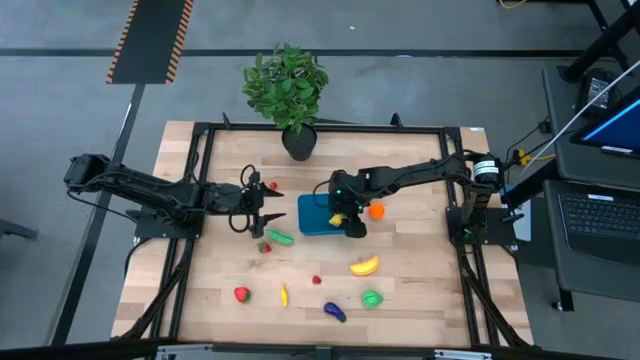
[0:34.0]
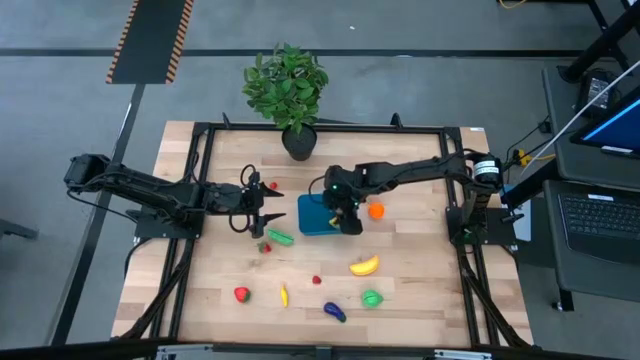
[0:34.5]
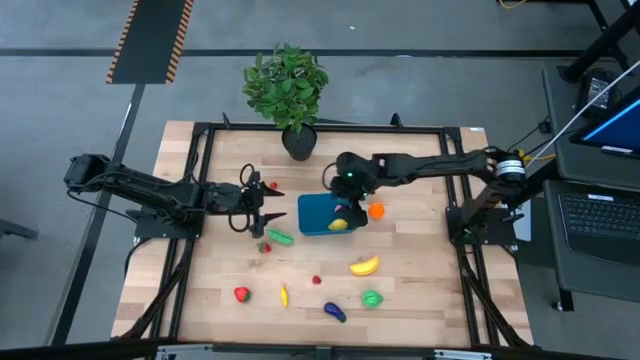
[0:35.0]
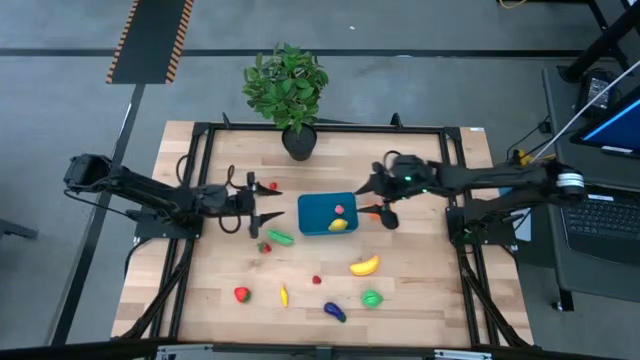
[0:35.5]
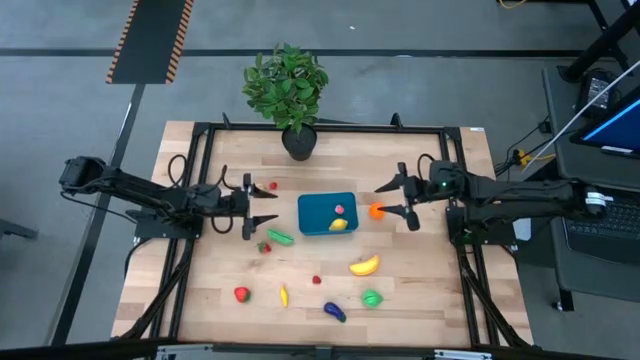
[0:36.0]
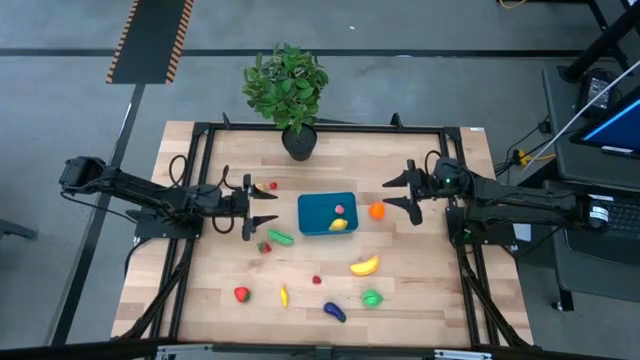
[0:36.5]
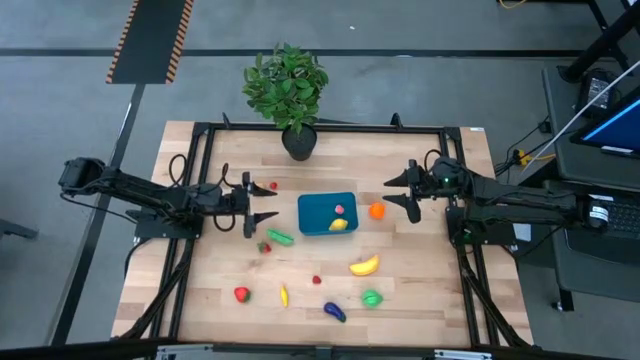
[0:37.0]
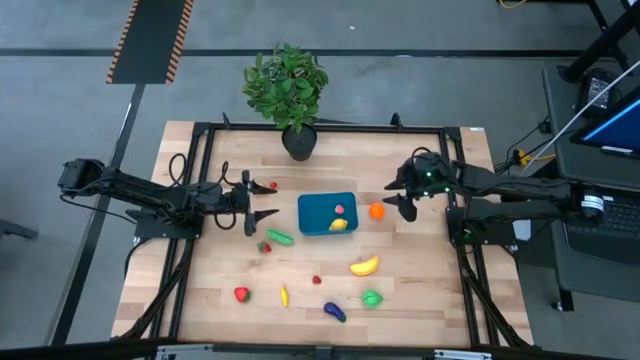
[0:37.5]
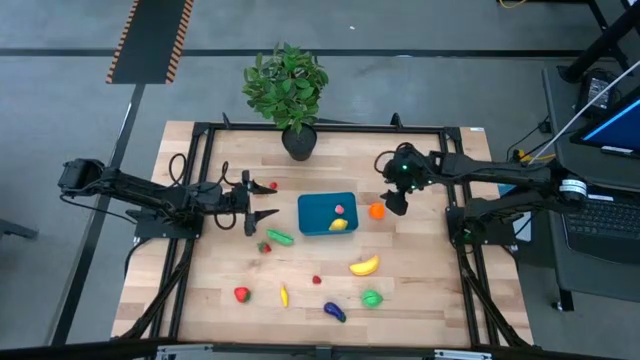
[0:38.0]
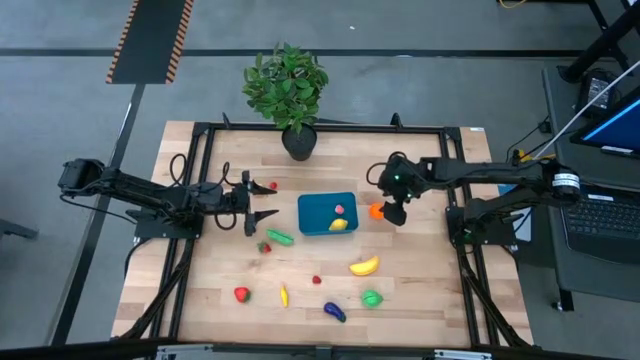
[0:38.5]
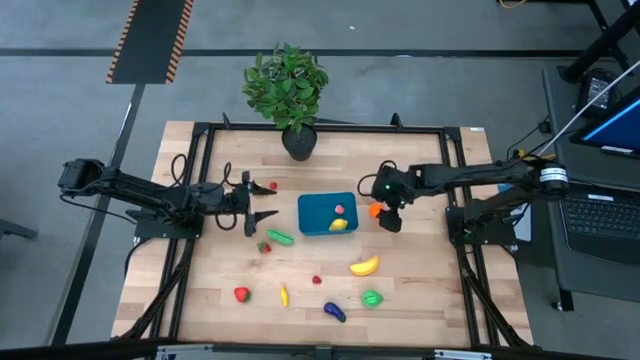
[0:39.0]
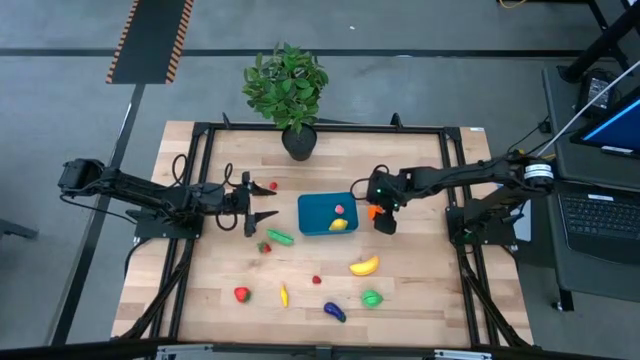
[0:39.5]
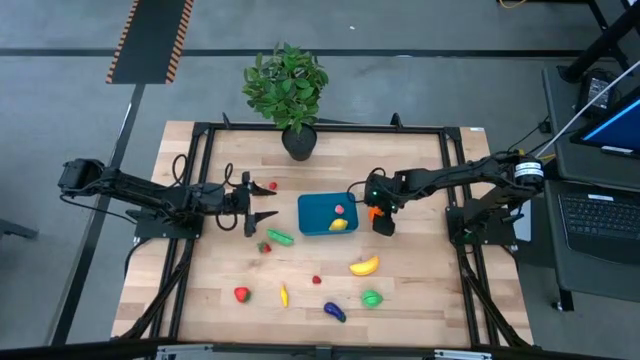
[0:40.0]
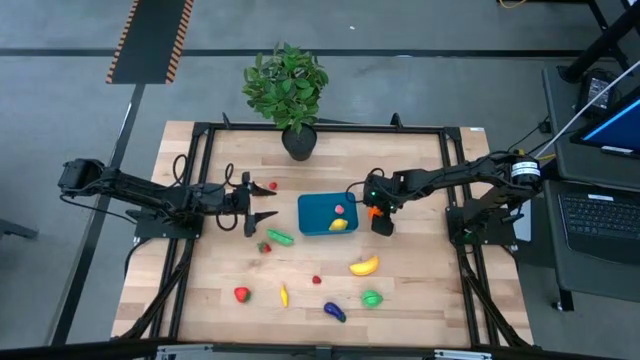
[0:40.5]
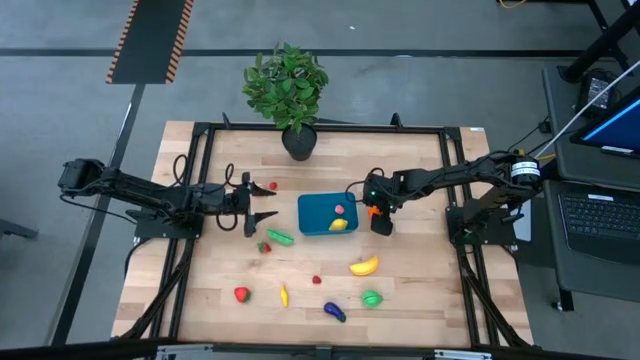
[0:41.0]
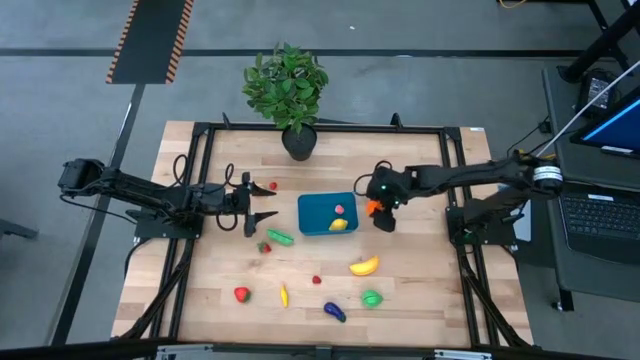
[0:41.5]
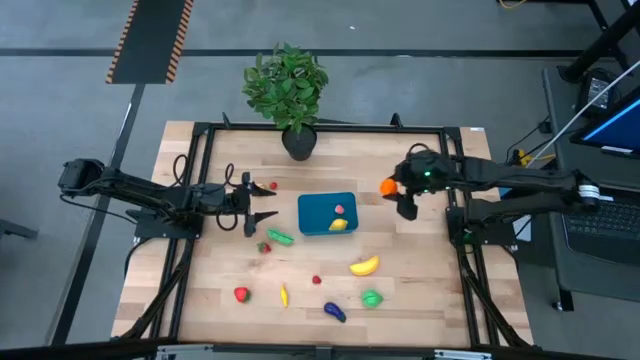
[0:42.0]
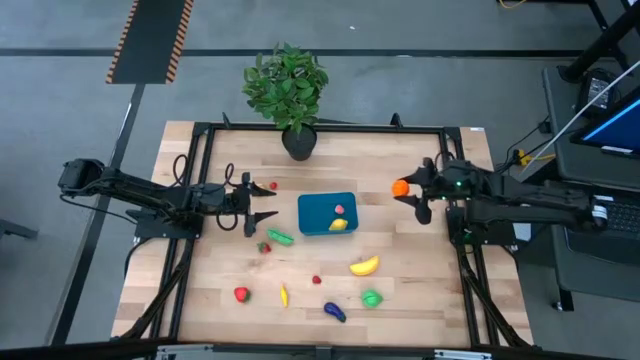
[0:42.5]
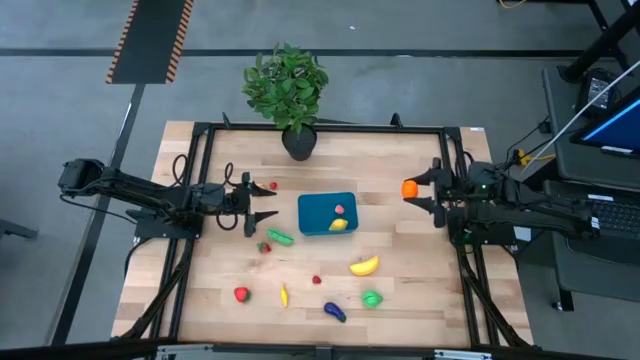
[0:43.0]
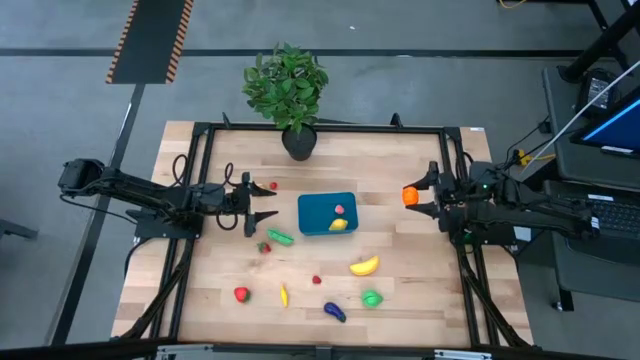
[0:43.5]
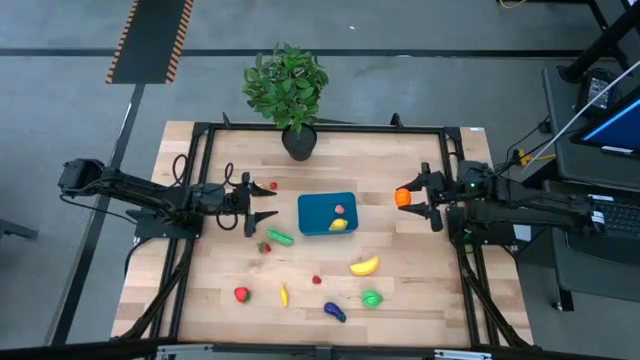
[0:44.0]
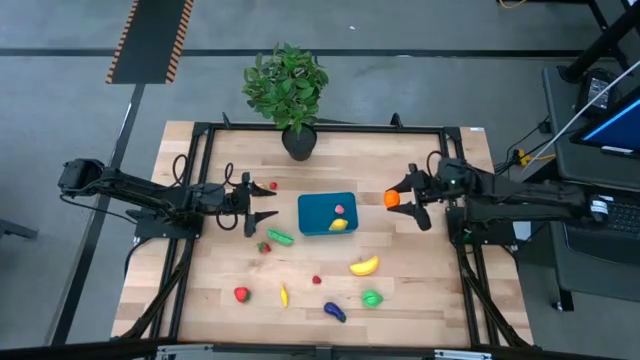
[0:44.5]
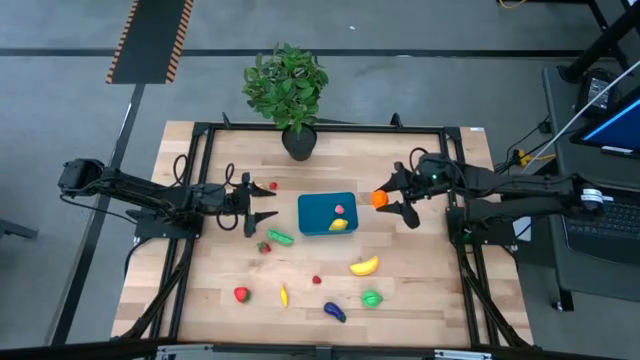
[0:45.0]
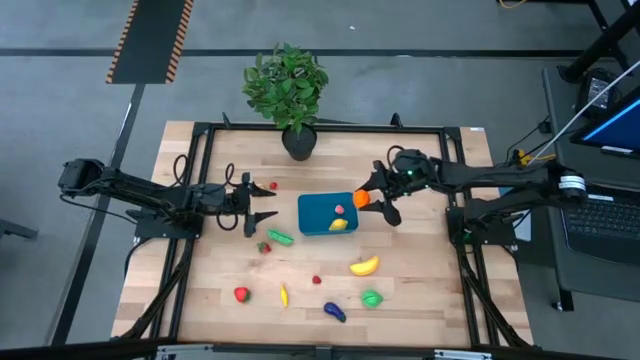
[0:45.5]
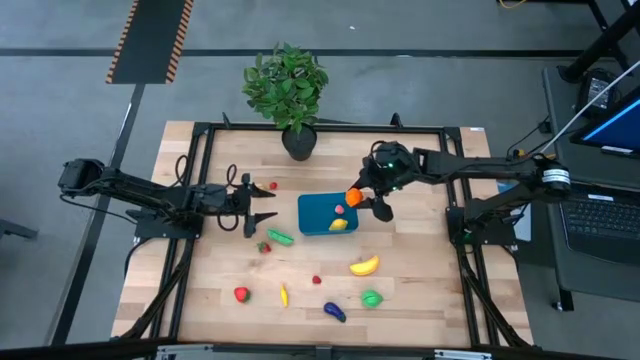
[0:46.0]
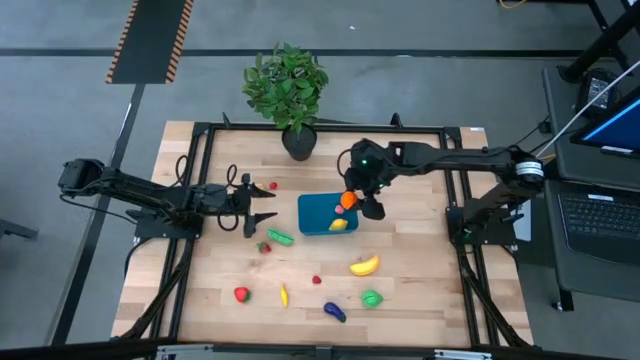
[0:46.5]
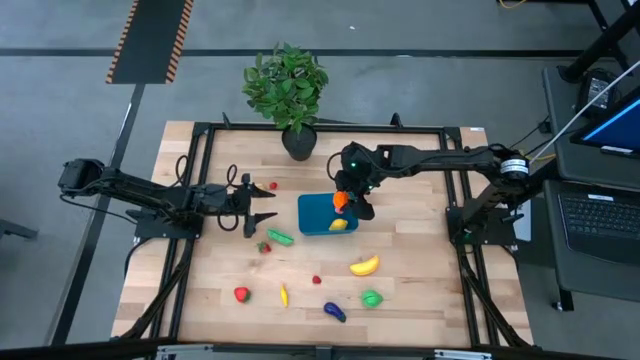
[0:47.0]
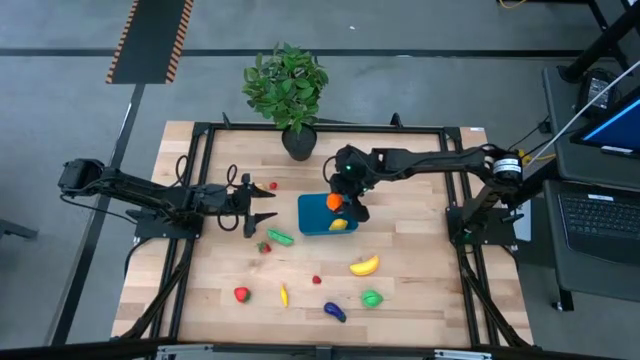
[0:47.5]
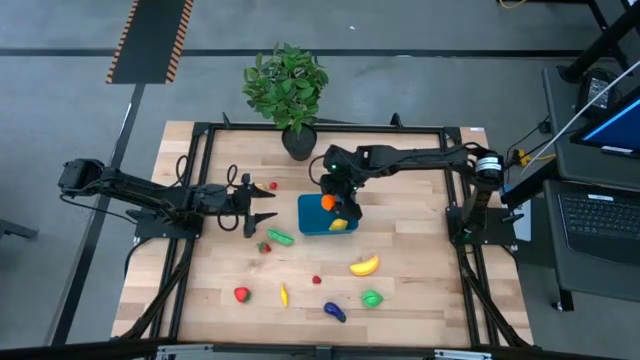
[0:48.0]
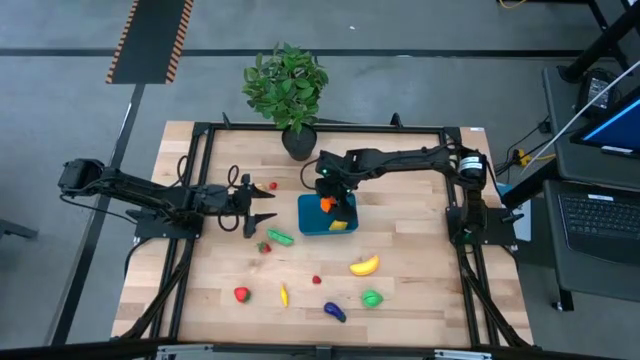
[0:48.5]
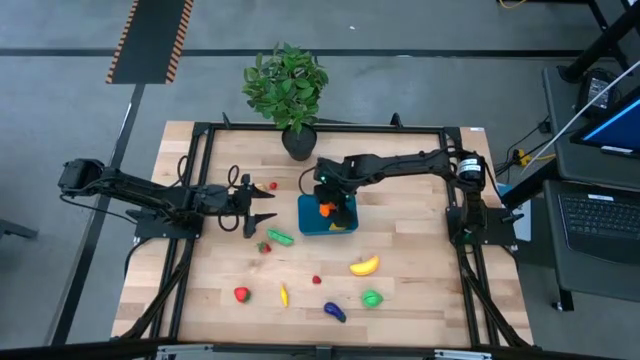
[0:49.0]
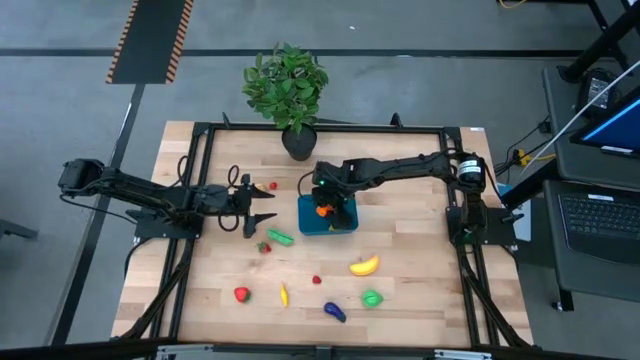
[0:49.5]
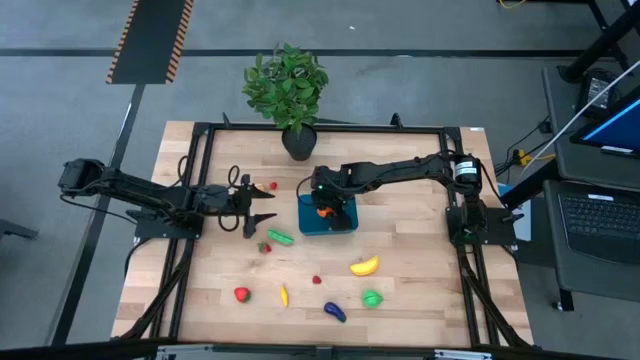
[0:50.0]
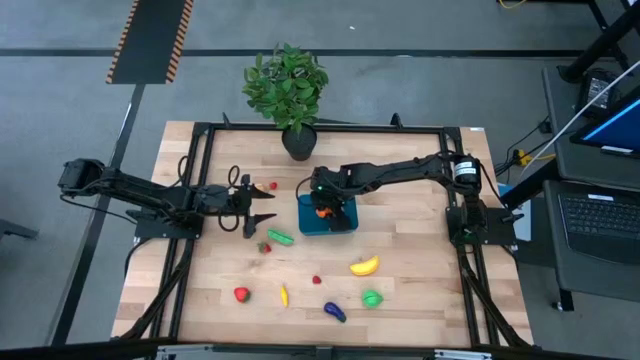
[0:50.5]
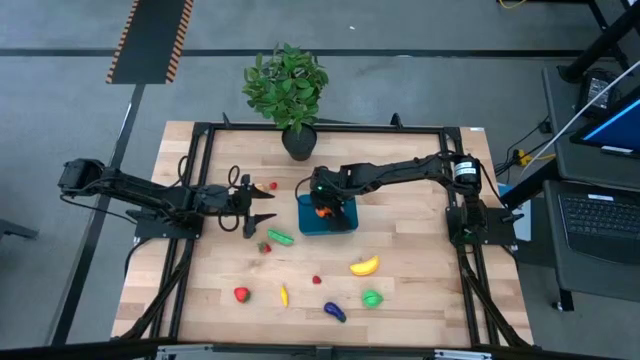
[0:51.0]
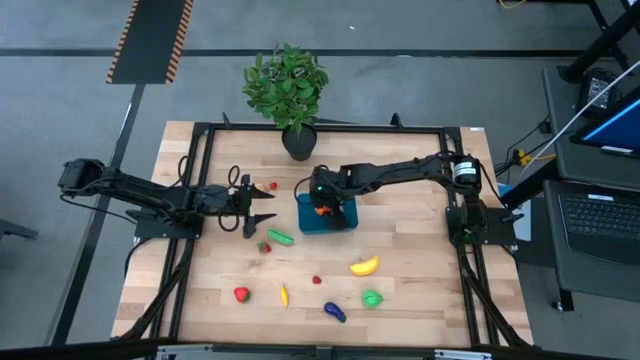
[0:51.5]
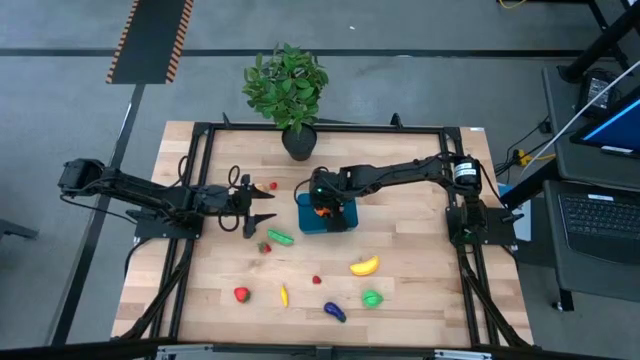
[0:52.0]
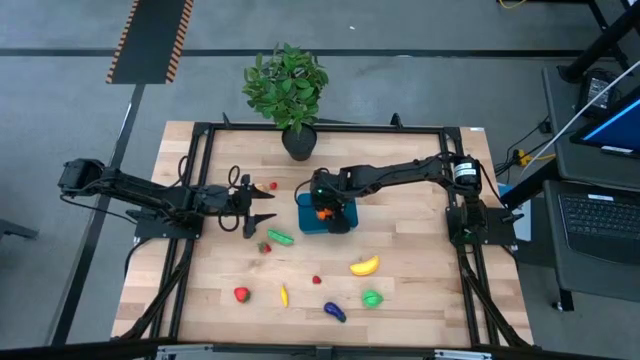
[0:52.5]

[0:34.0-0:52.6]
Task: Pick and placing Produce into tupperware
Put the tangerine into the blue bin

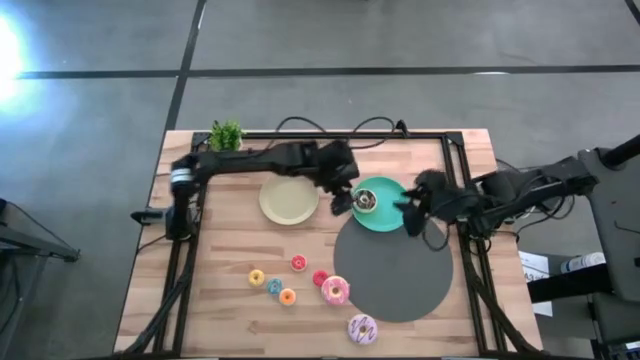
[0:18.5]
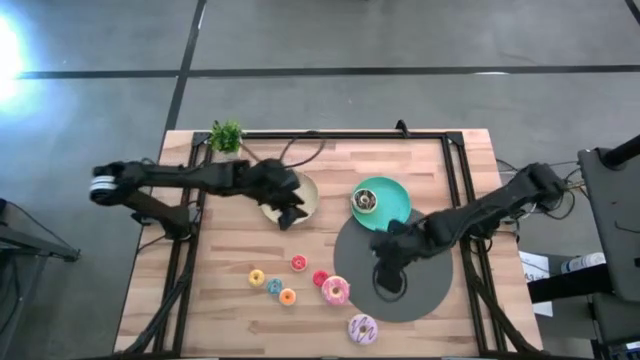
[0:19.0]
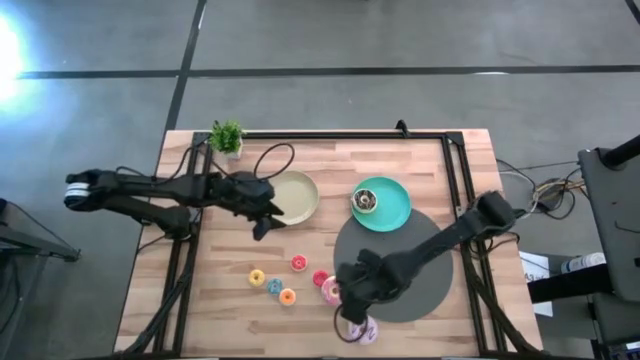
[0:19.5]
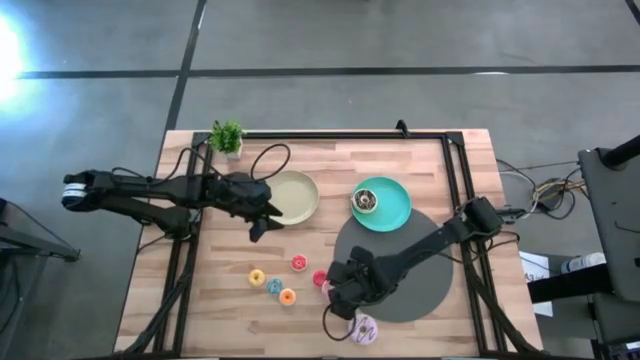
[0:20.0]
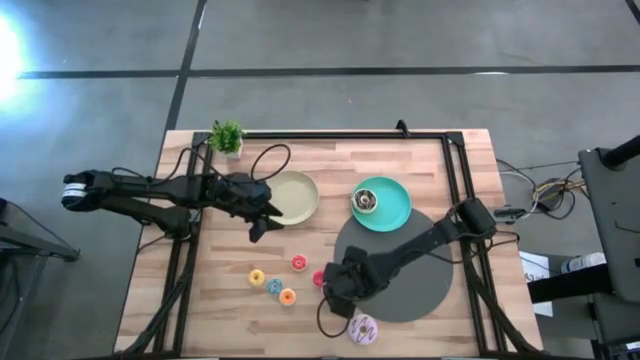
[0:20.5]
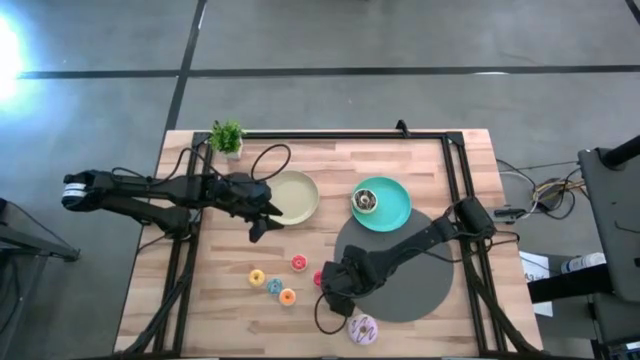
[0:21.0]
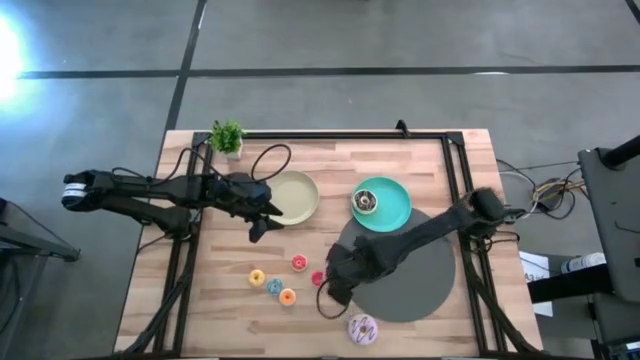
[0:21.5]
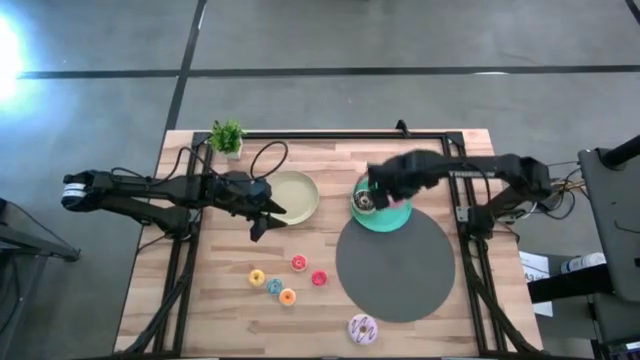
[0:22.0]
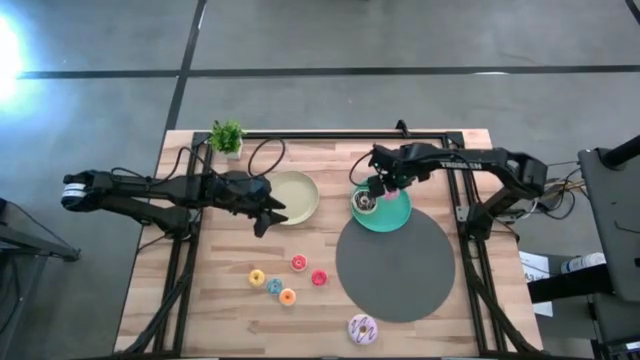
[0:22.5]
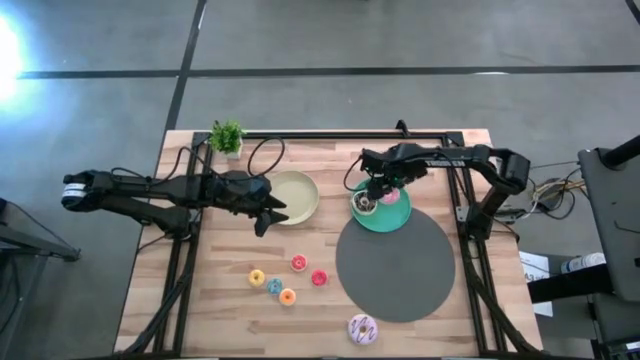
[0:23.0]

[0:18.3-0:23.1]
Task: Pick & Place donuts
Put the large pink donut on the blue plate
